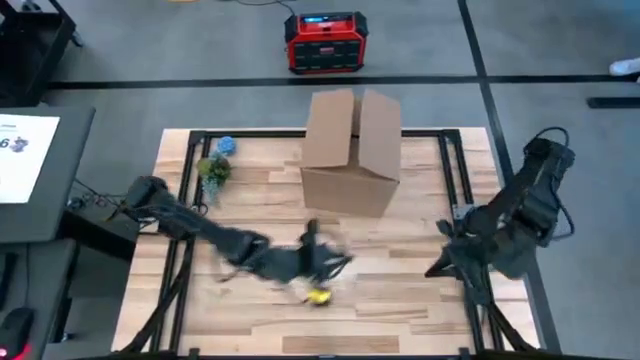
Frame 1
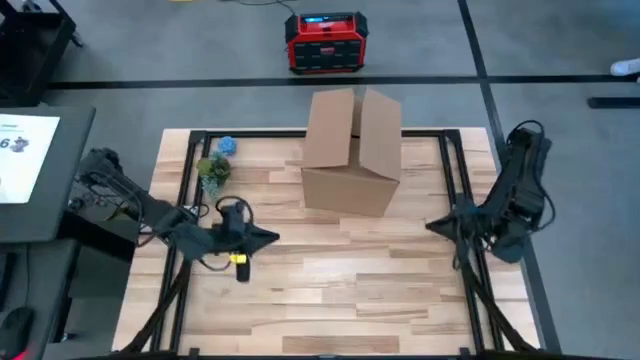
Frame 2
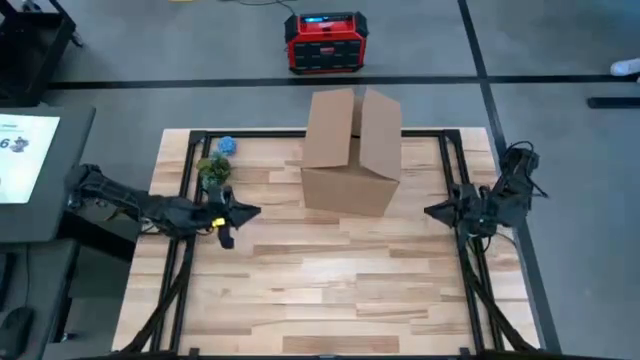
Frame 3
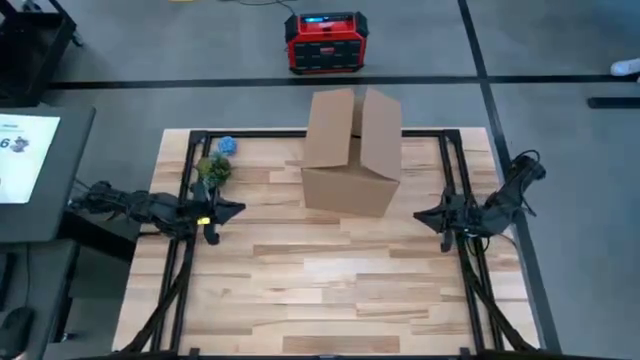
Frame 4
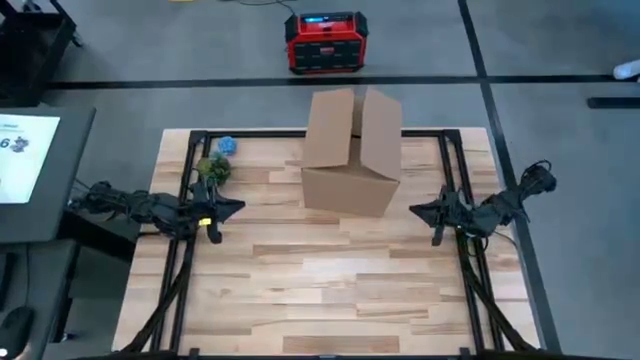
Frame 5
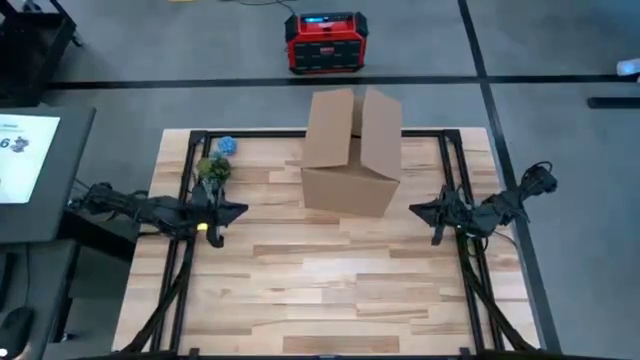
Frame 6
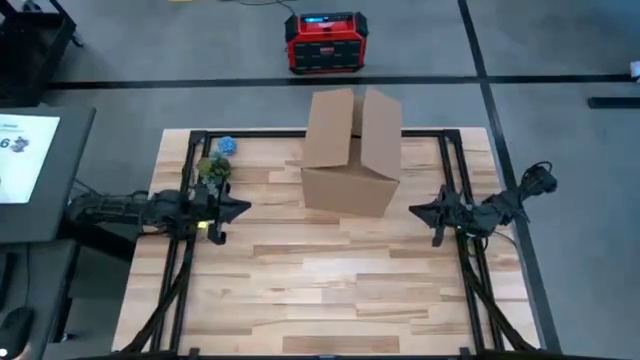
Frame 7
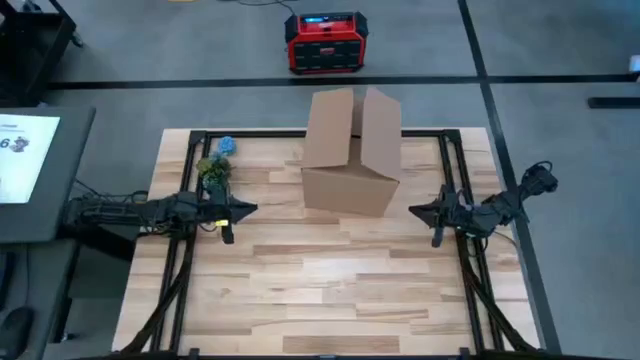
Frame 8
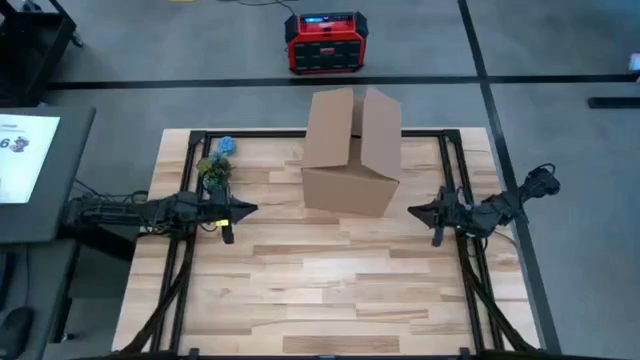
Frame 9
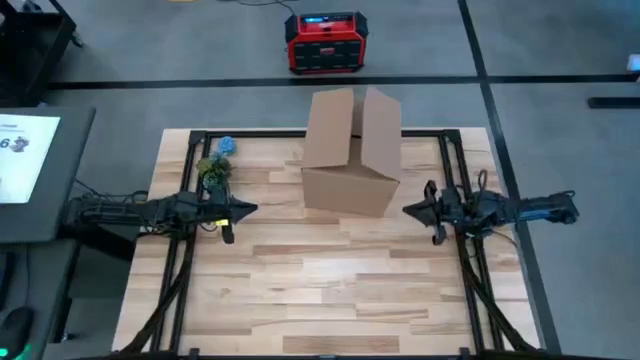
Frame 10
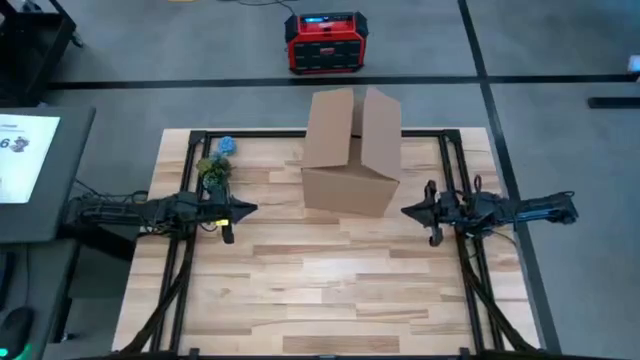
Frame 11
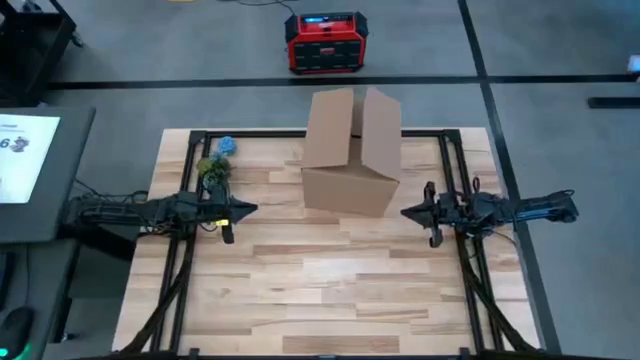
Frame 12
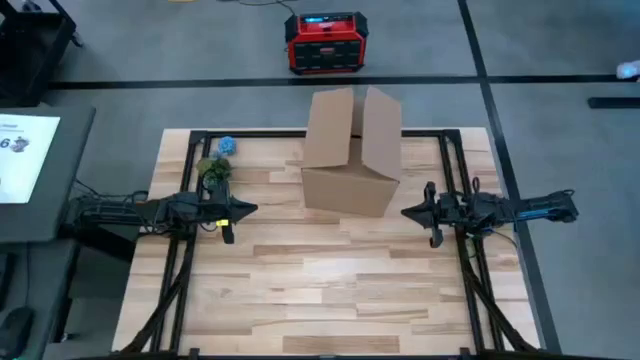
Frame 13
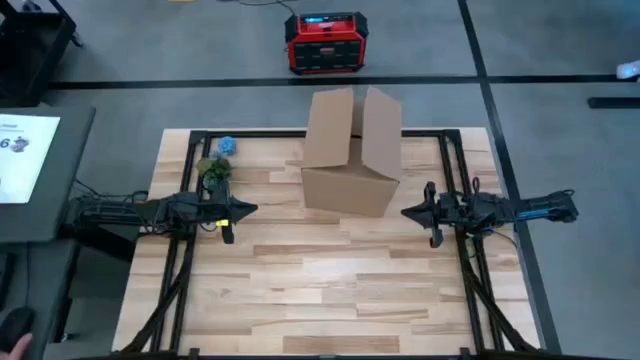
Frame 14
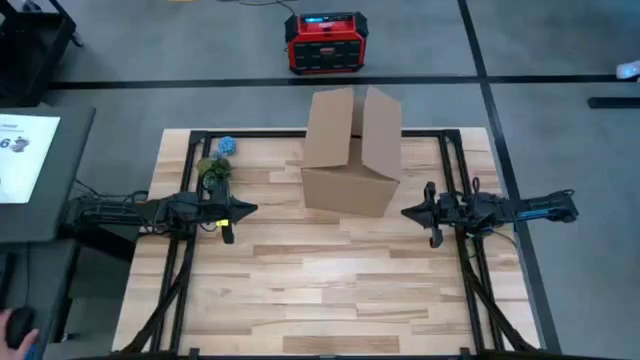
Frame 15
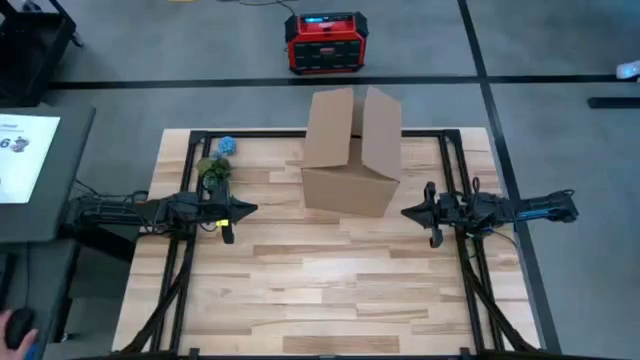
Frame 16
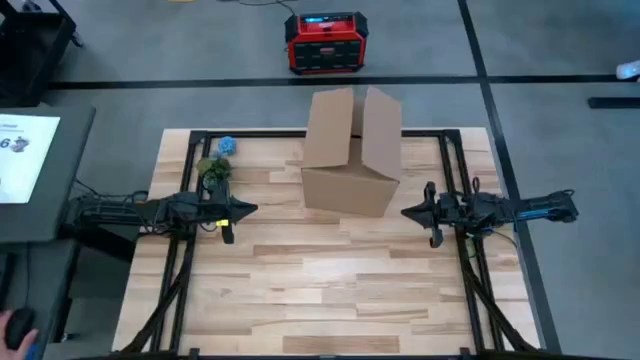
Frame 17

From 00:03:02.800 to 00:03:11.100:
Task: wrap mug
Return to Home Position

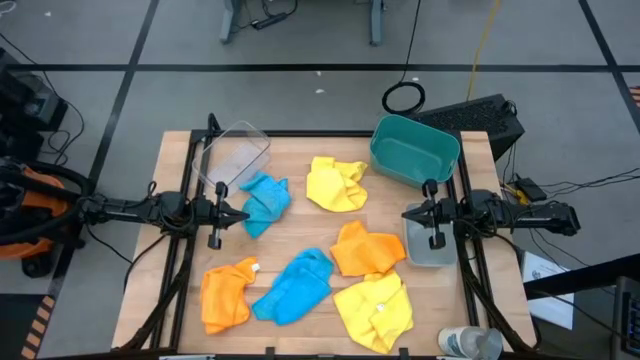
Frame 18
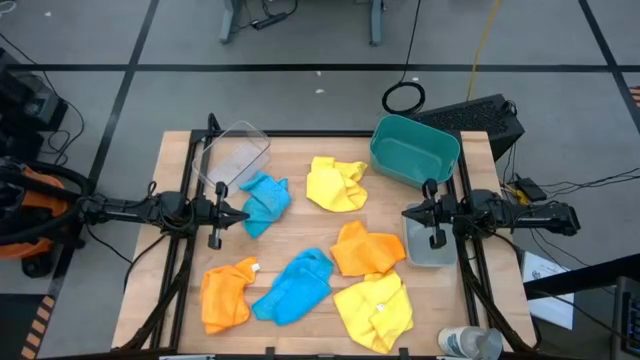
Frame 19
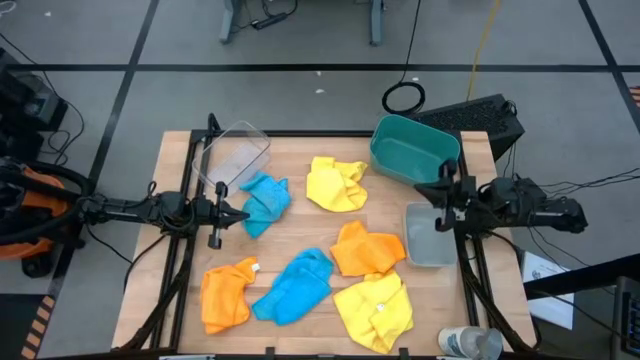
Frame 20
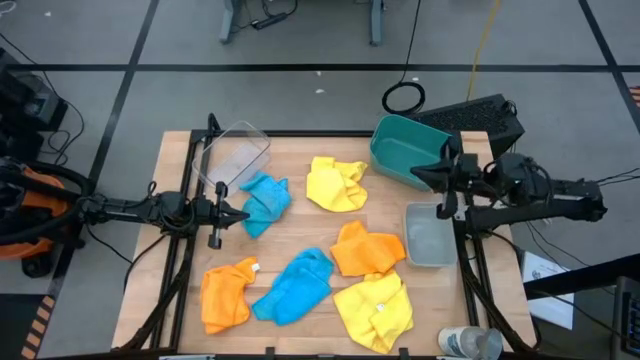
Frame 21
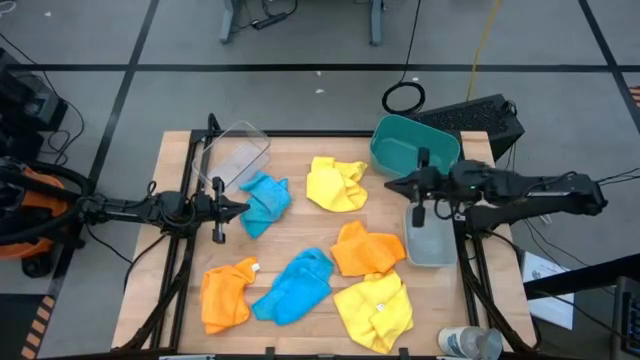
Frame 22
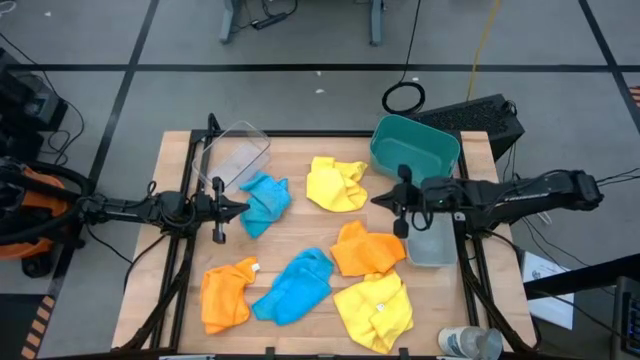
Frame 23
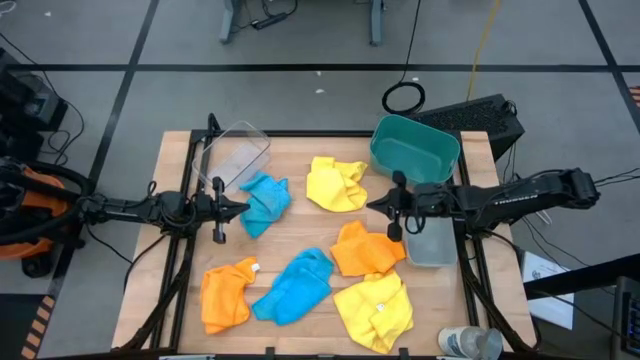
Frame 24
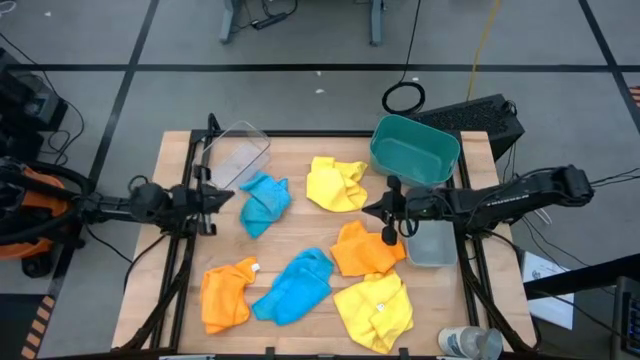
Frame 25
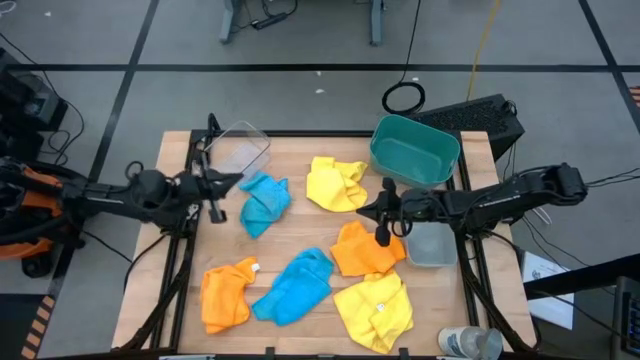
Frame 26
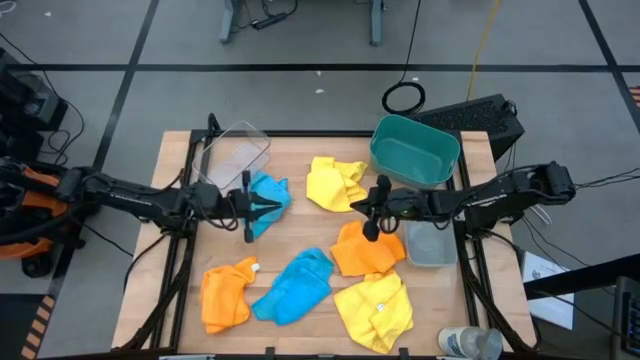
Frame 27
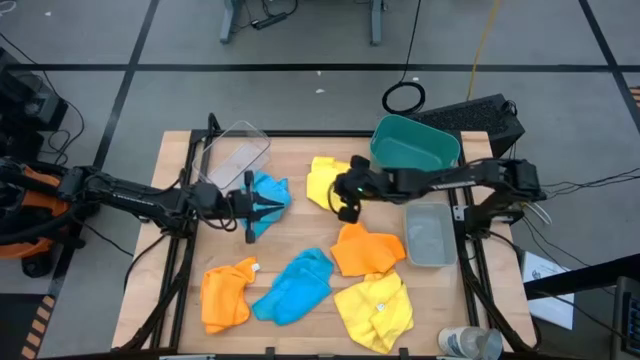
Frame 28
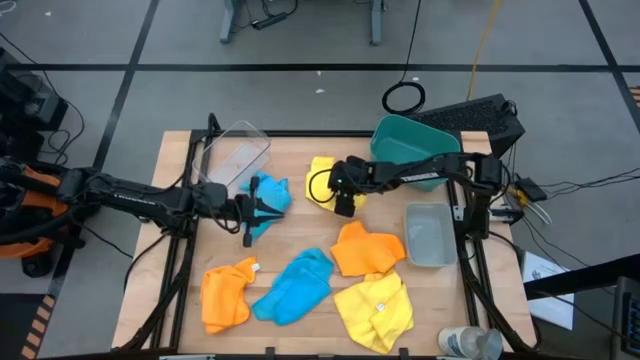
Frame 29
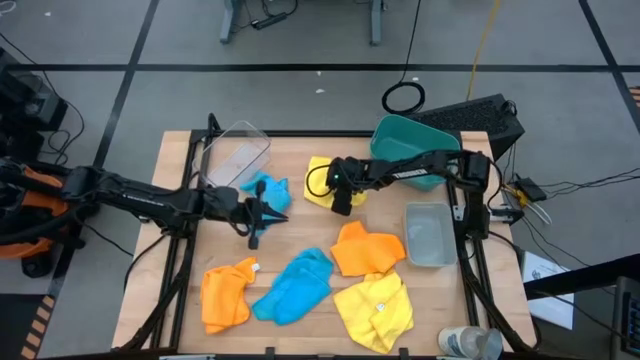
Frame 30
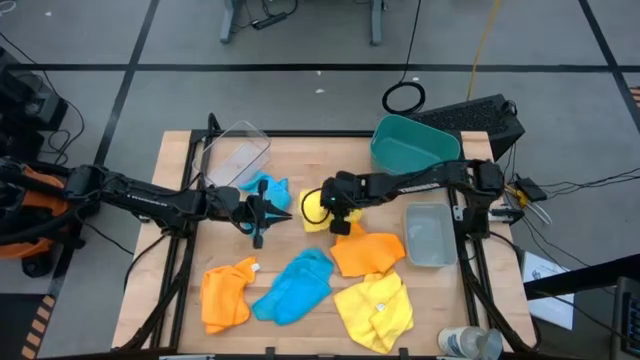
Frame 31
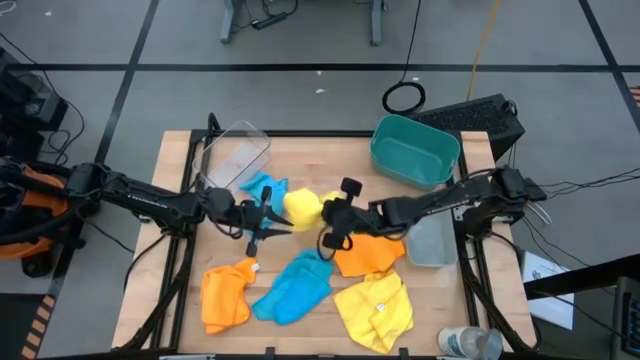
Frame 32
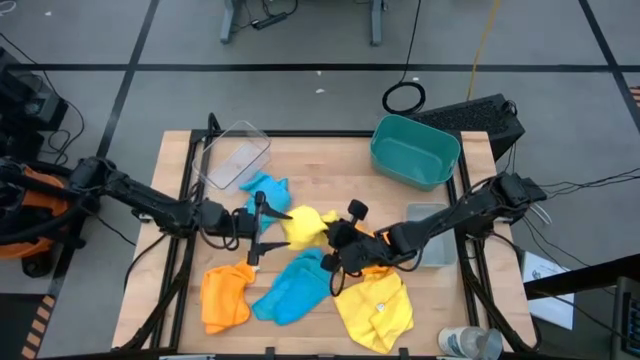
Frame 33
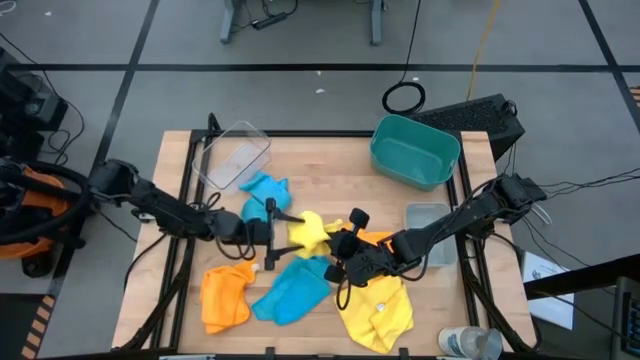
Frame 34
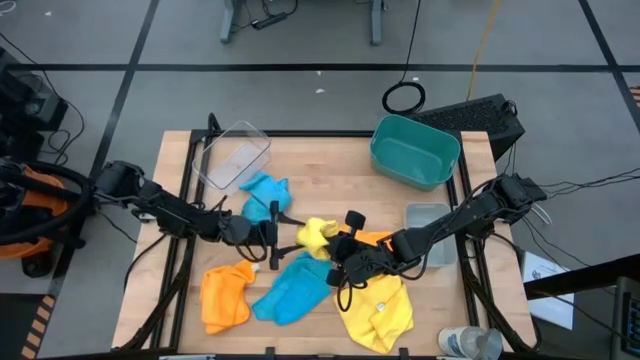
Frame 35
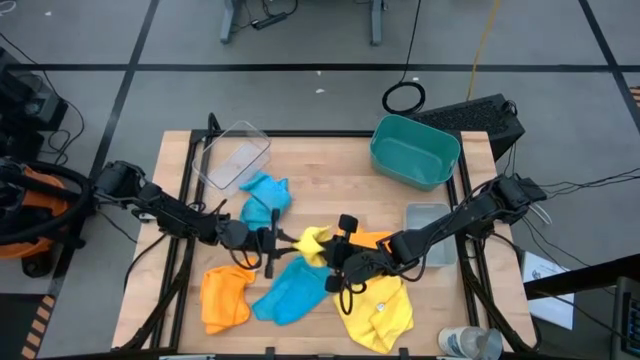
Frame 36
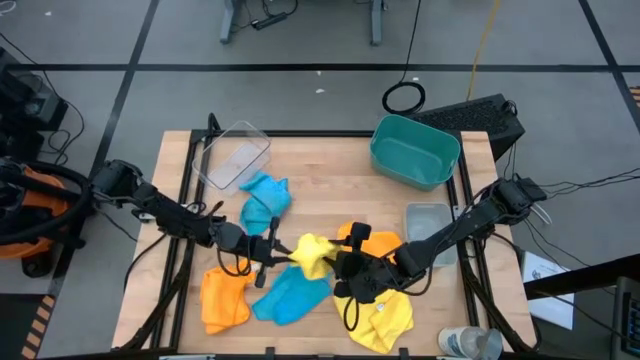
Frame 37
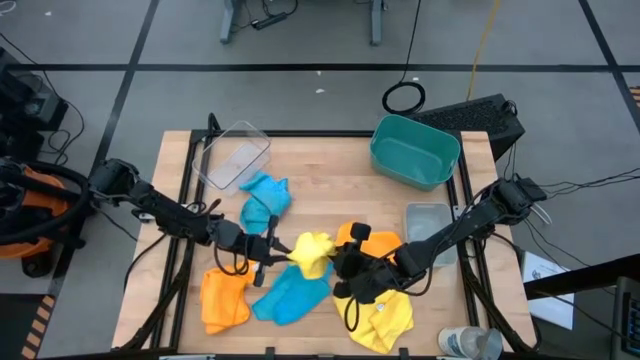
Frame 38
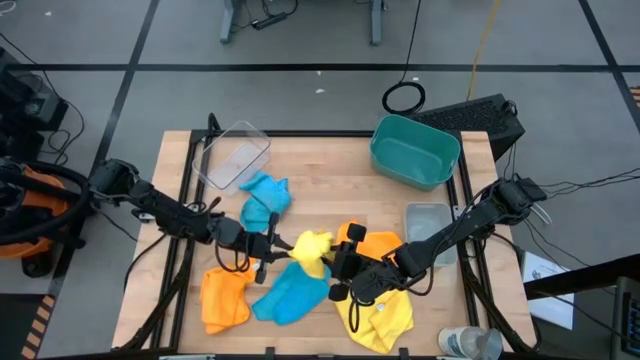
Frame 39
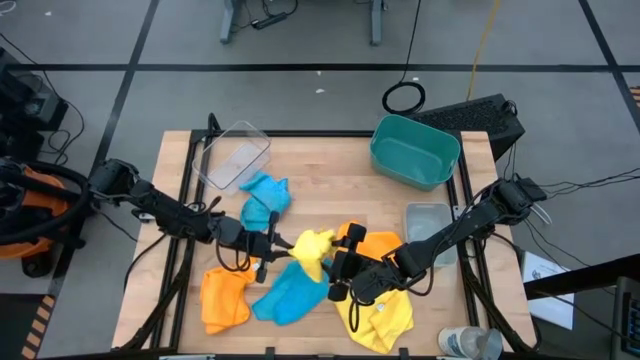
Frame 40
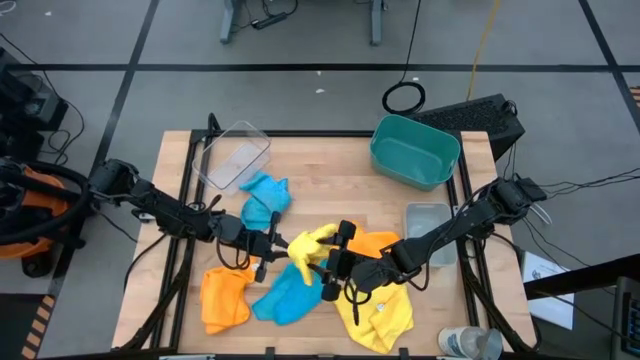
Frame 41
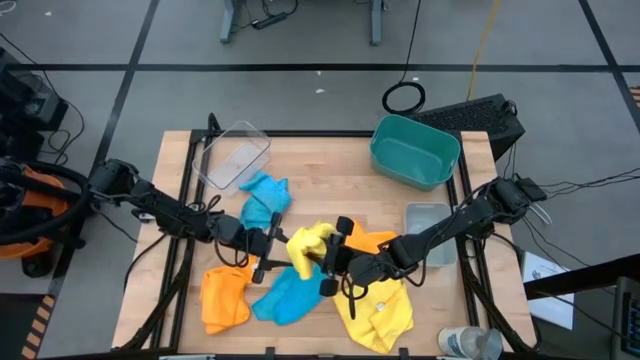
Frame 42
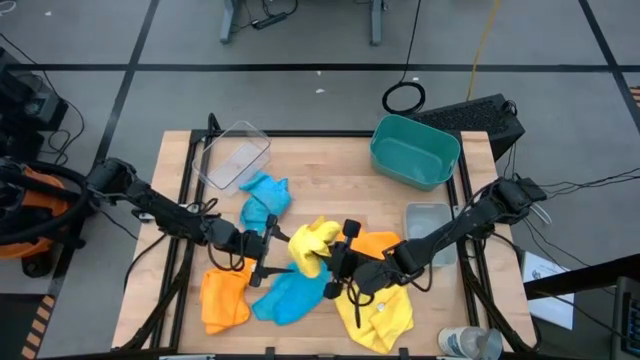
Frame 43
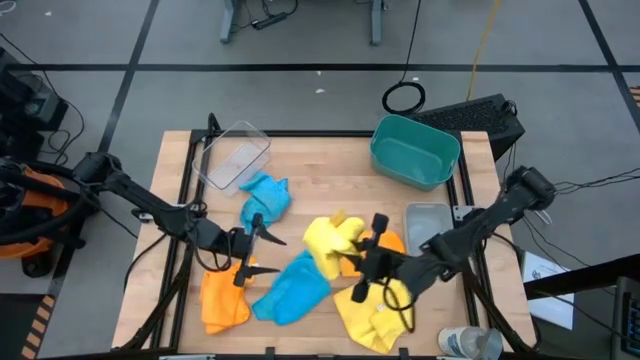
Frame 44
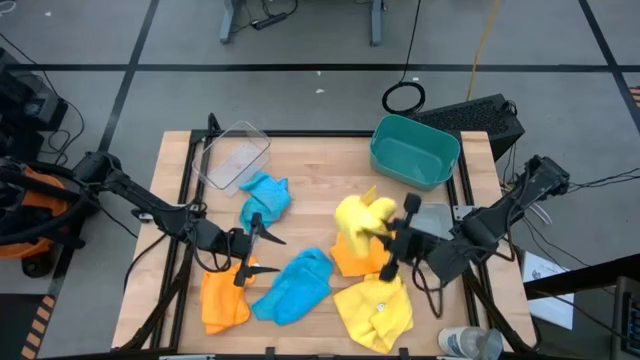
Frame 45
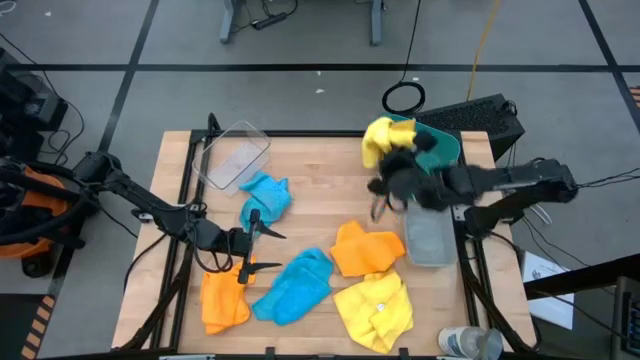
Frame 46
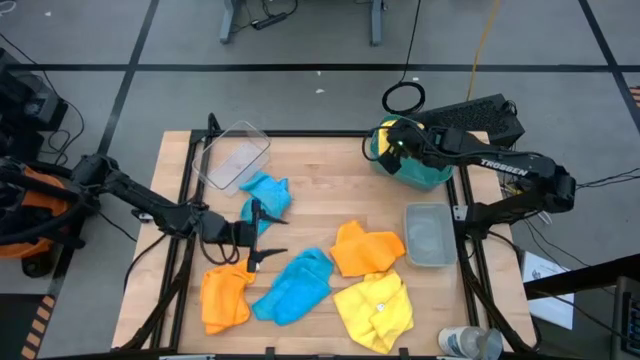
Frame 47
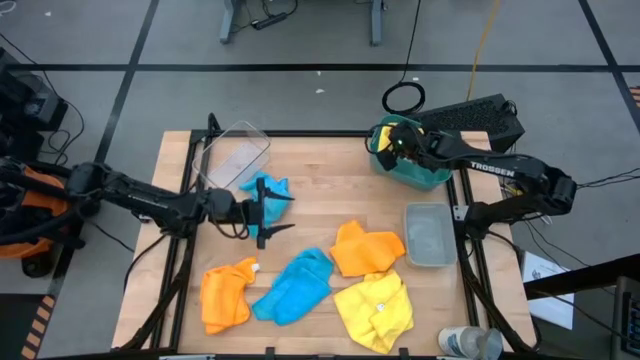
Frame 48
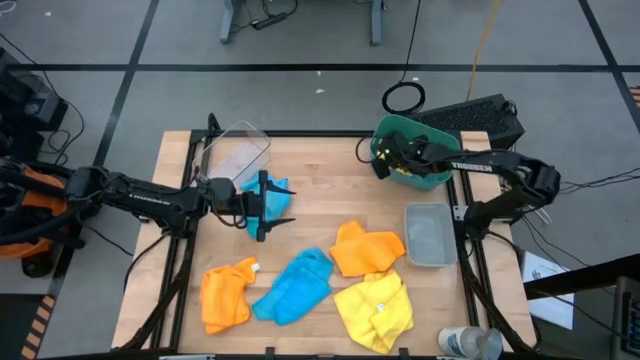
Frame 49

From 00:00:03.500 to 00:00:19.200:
Task: Sort microfiber towel by color & place in baskets
Put the top yellow towel into the green bin
